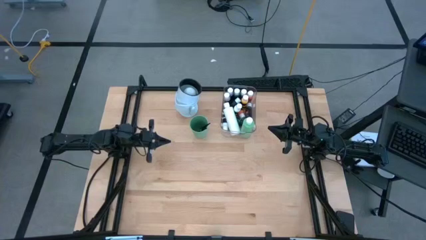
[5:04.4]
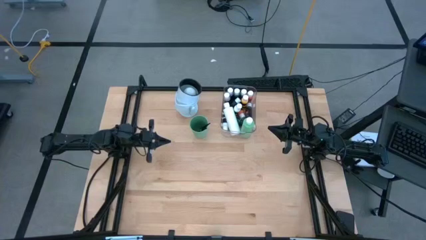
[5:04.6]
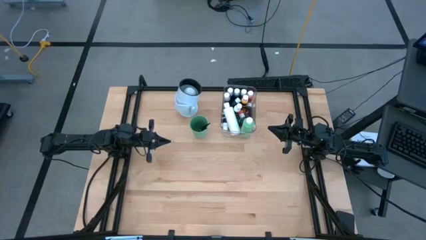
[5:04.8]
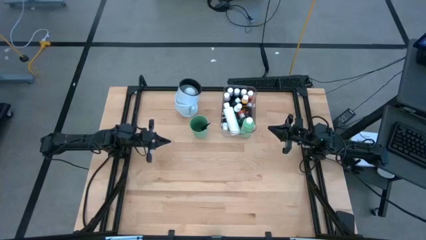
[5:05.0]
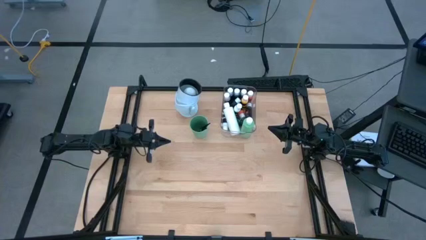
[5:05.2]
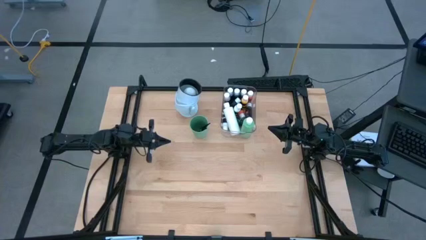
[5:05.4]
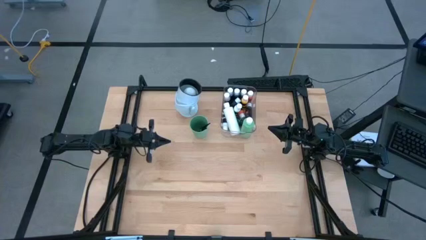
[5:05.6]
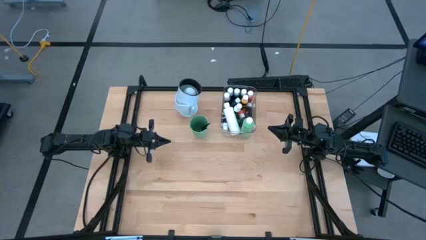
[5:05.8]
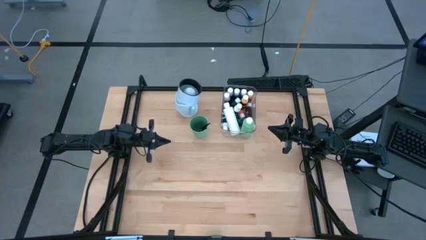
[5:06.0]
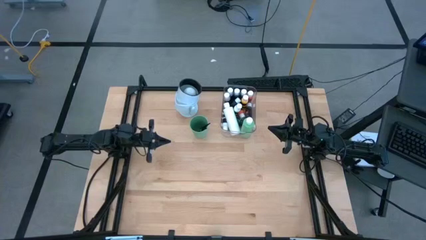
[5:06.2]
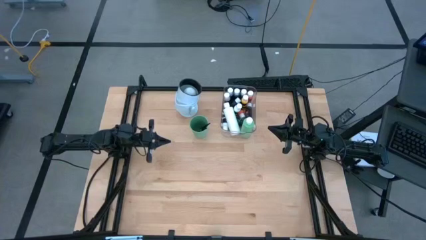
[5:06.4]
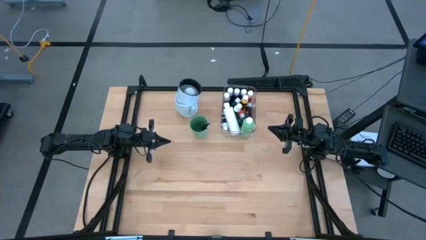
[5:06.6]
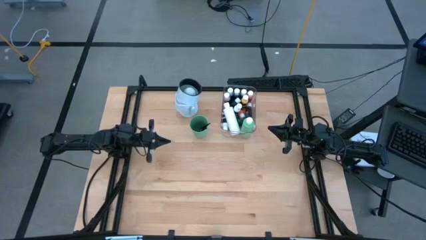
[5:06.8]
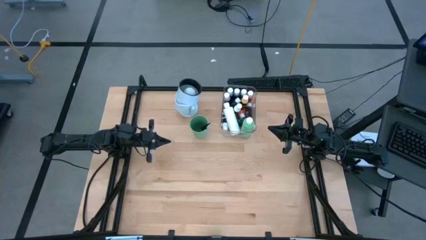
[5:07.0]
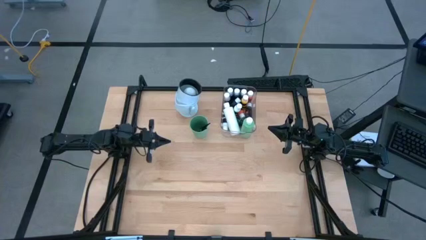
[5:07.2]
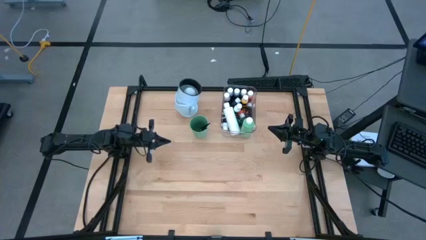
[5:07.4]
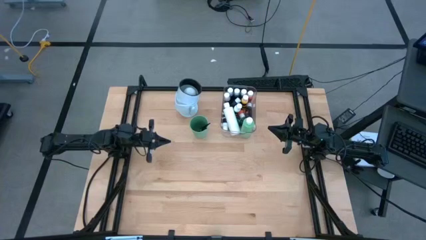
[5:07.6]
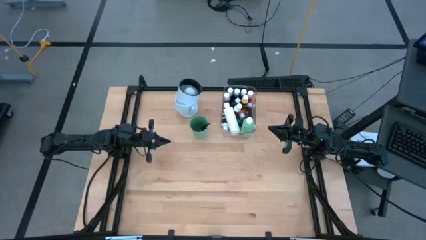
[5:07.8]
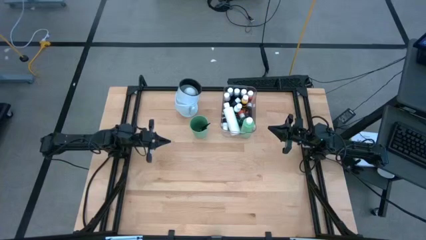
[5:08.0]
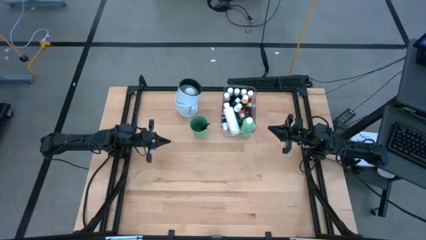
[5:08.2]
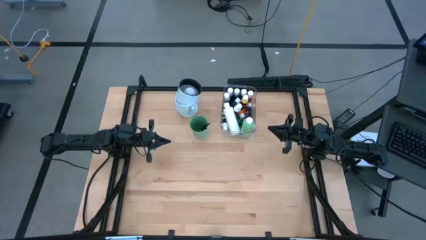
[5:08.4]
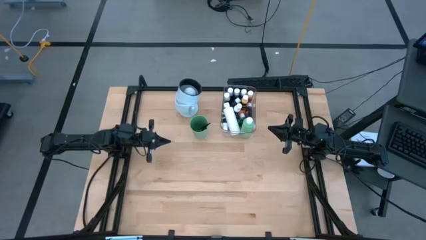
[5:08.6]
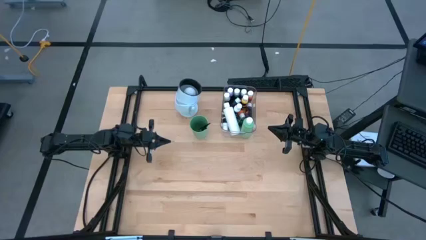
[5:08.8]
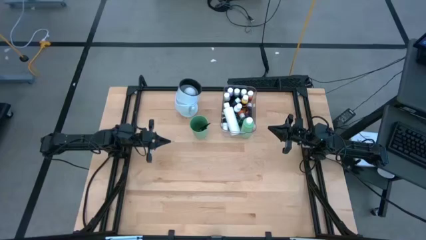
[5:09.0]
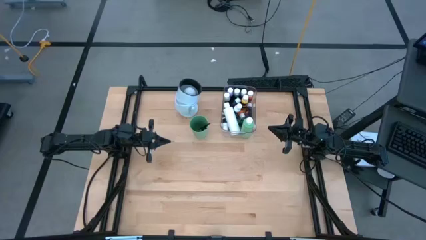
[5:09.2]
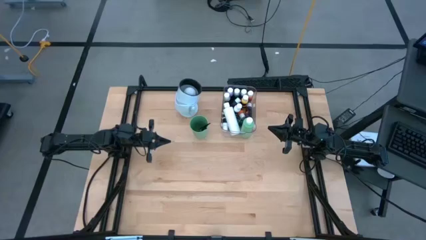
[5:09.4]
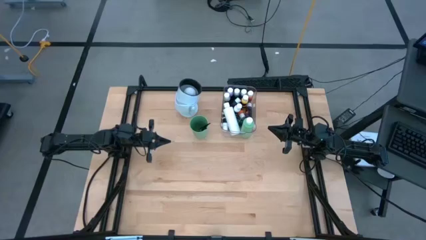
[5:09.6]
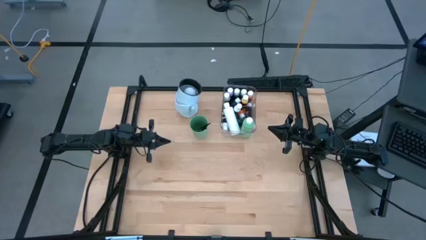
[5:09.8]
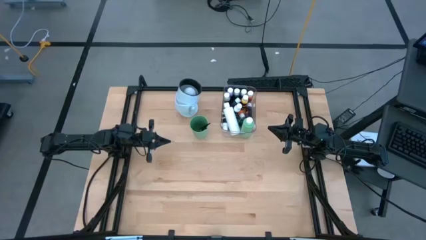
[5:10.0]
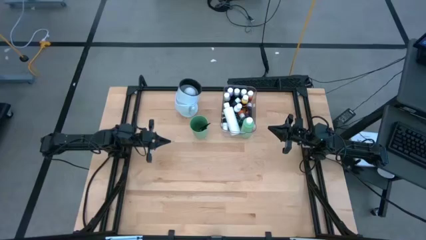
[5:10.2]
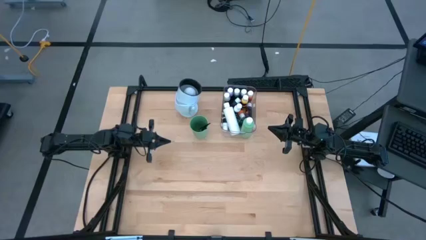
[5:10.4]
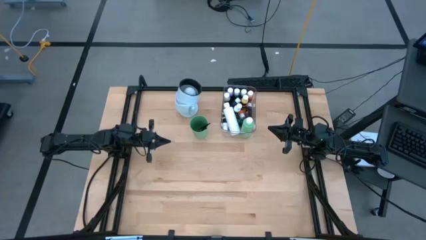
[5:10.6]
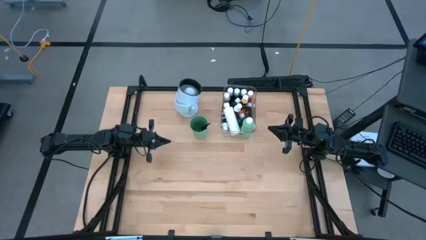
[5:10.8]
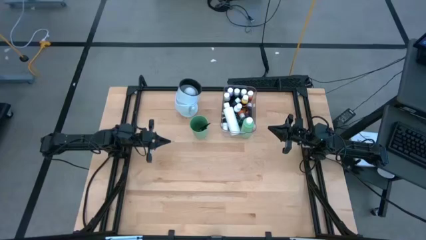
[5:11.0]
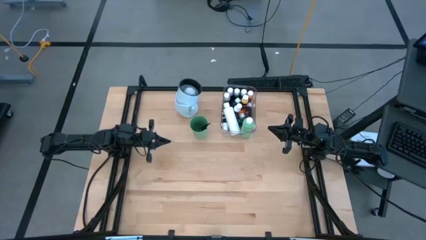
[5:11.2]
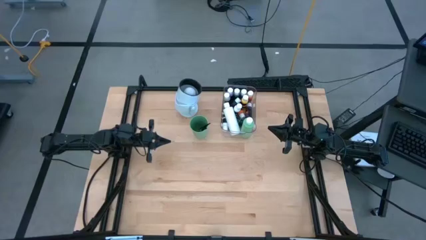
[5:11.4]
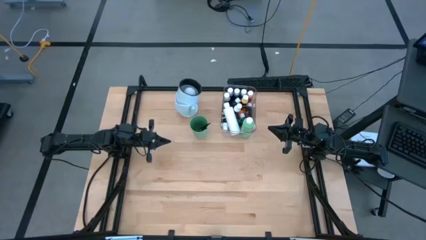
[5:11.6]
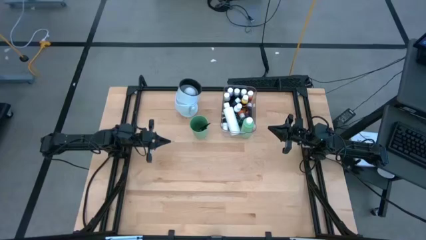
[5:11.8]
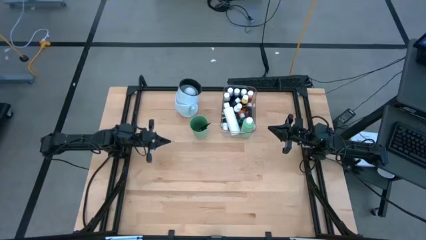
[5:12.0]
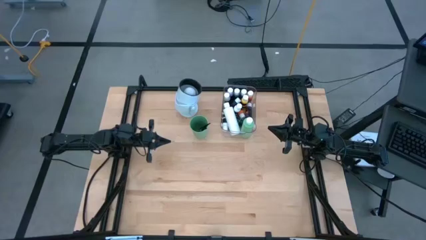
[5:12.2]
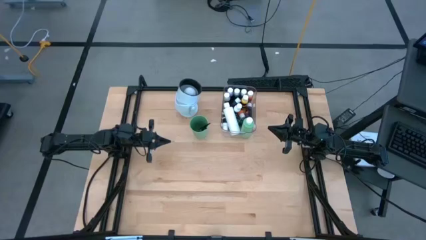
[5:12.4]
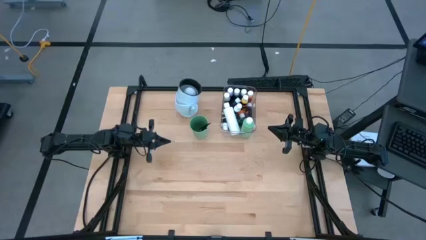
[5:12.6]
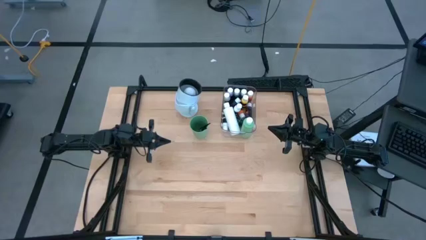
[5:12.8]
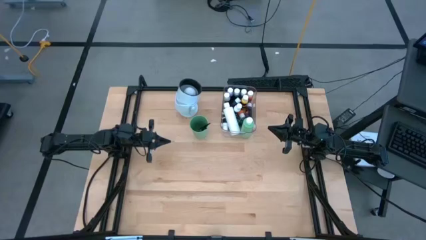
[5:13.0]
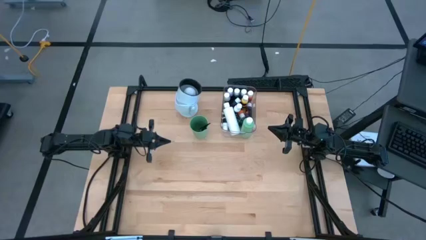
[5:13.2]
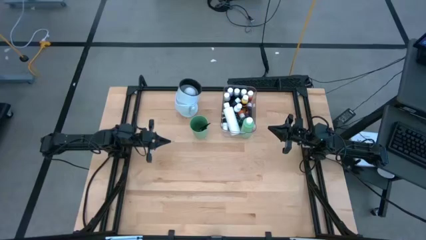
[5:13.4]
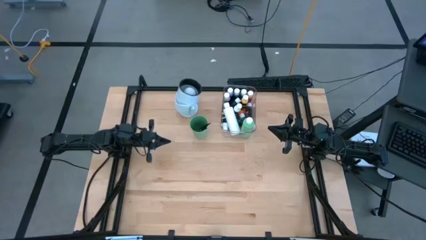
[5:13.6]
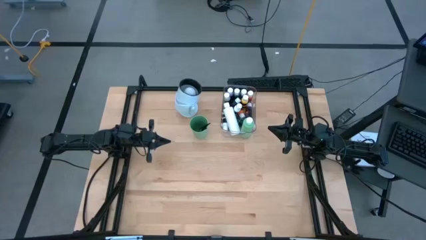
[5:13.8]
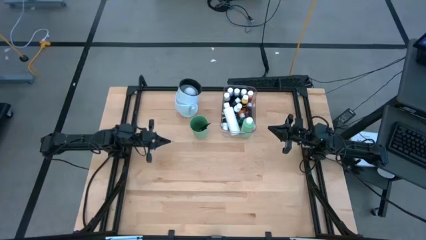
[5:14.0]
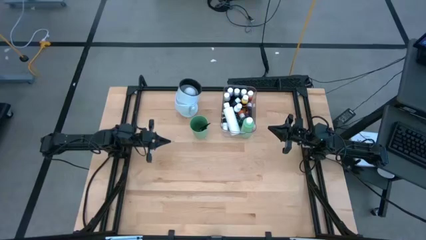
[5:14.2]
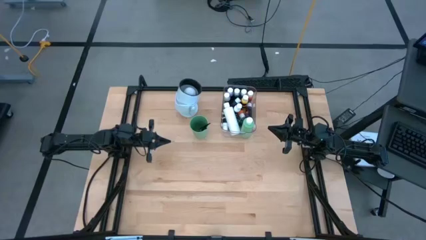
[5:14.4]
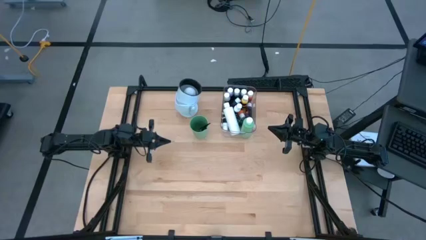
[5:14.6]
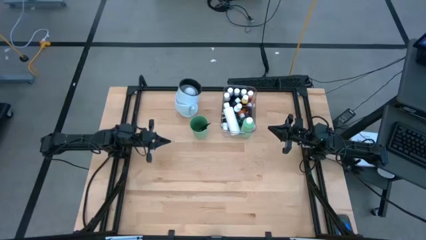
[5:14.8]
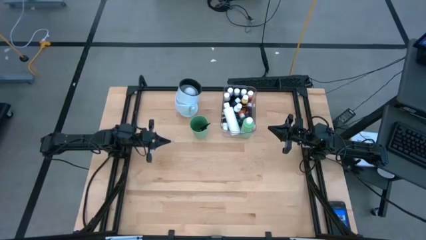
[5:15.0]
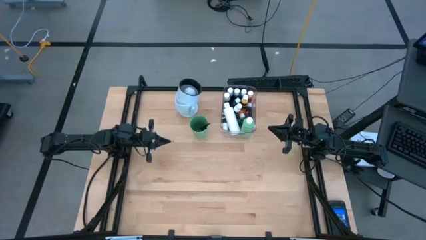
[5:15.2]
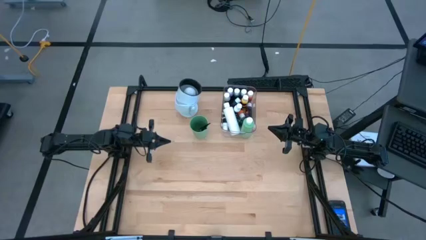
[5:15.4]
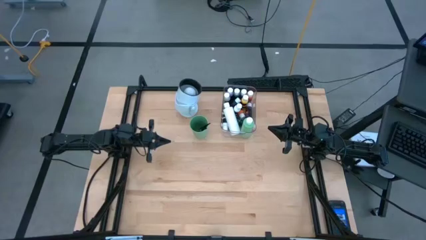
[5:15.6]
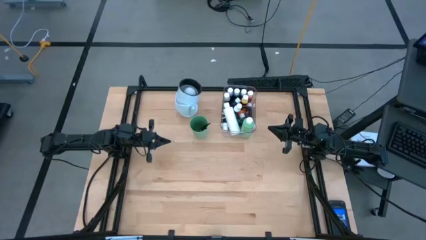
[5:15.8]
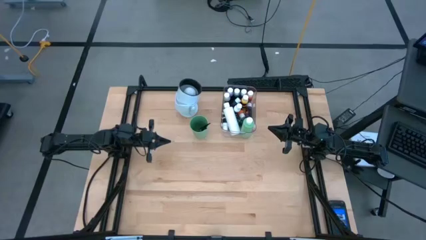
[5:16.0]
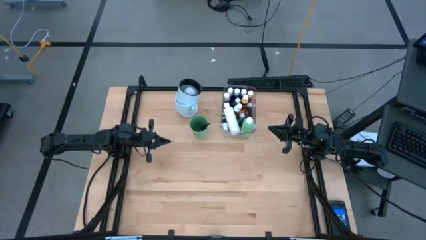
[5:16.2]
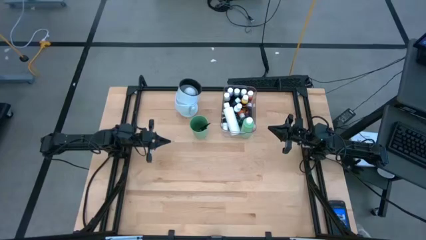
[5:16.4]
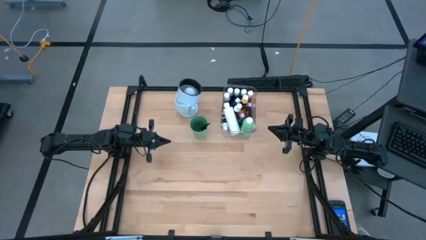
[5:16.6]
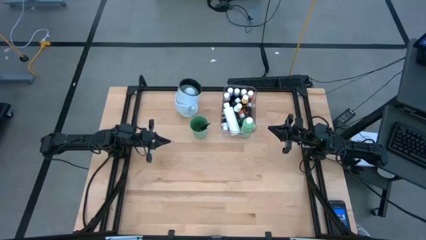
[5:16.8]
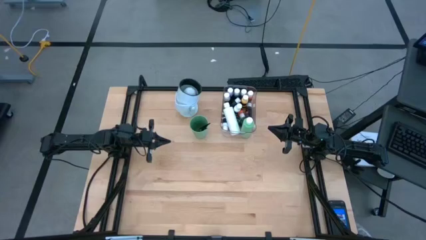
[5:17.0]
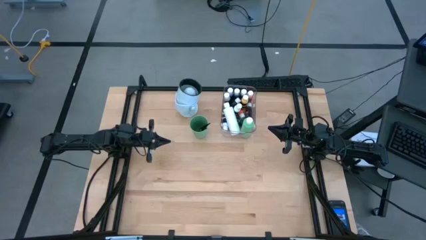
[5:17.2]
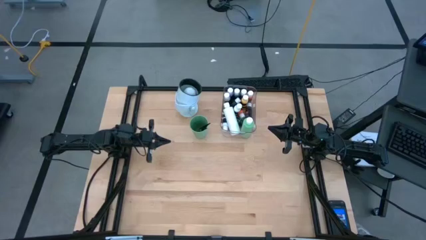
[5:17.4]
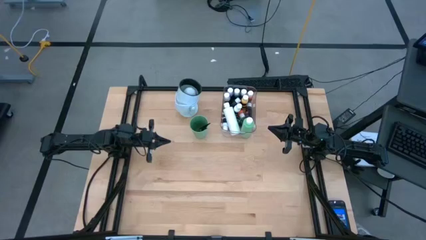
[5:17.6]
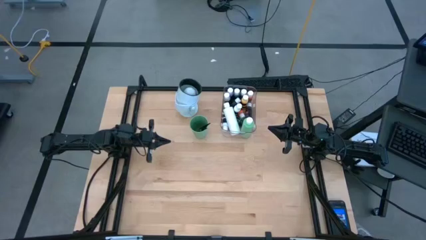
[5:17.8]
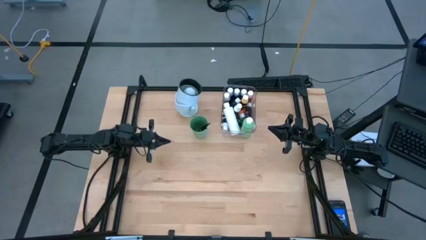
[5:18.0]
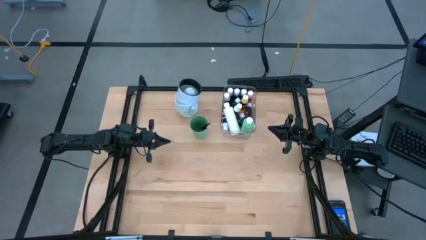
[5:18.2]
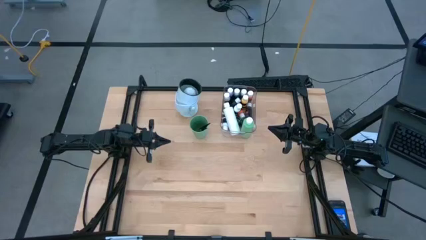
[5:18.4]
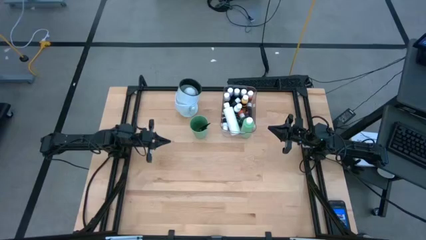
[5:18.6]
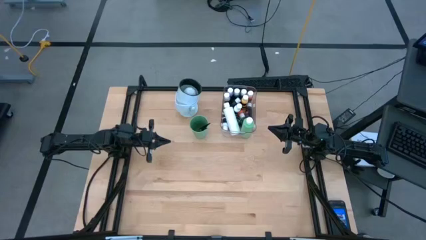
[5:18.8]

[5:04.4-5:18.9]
Task: Pick & Place Paint Supplies
Return to Home Position
